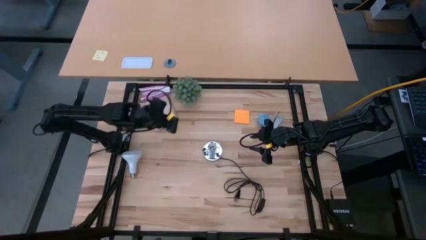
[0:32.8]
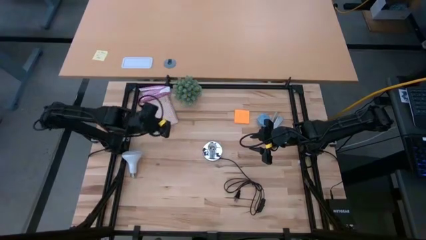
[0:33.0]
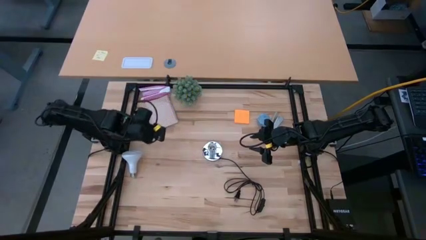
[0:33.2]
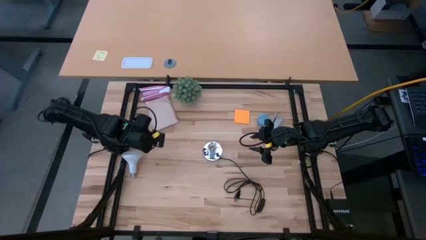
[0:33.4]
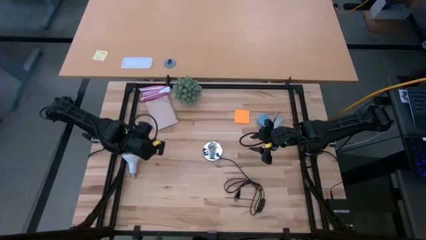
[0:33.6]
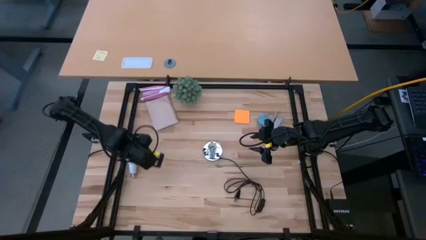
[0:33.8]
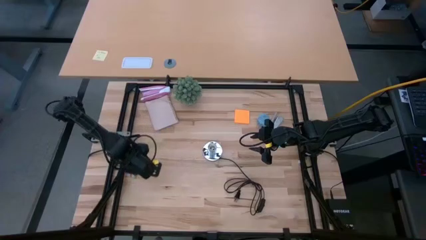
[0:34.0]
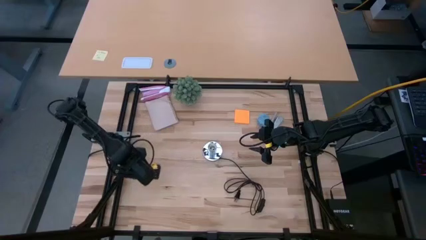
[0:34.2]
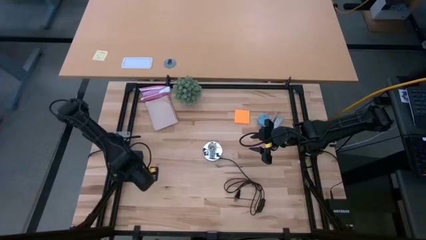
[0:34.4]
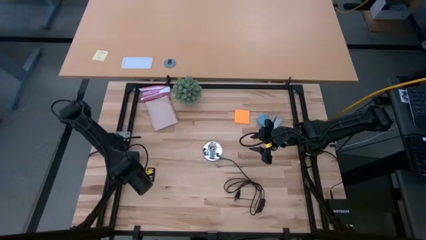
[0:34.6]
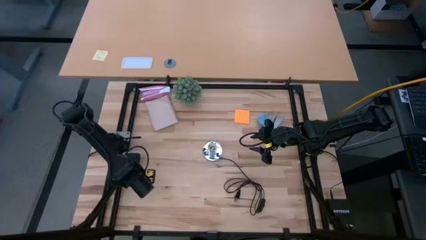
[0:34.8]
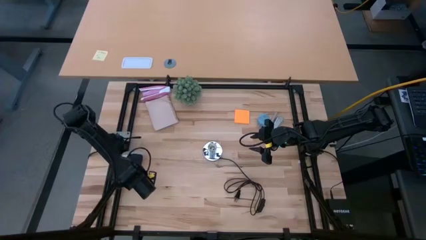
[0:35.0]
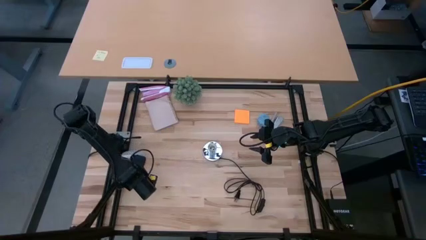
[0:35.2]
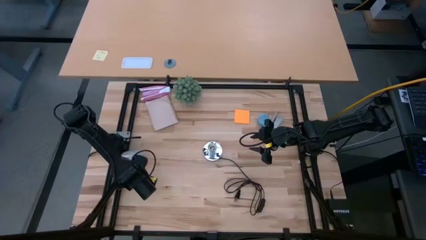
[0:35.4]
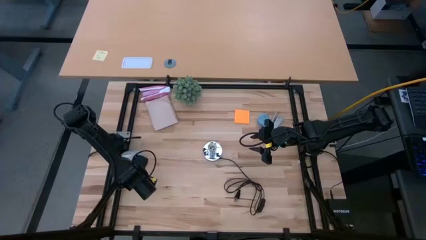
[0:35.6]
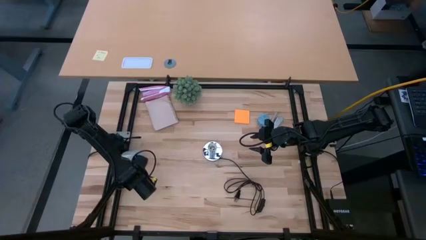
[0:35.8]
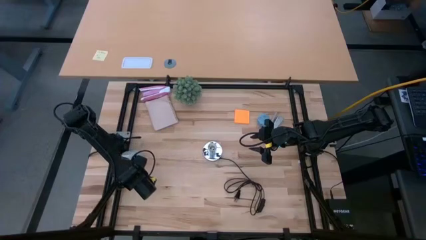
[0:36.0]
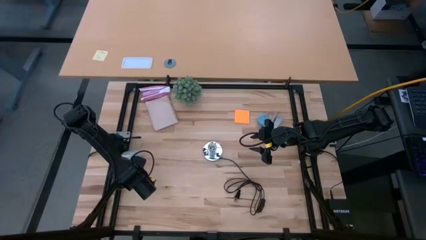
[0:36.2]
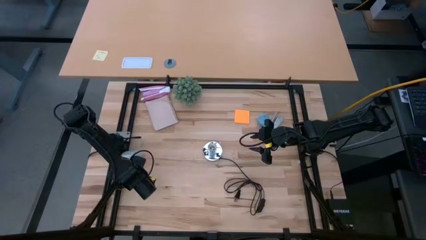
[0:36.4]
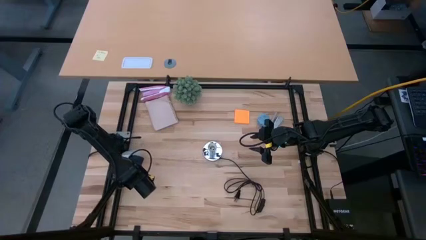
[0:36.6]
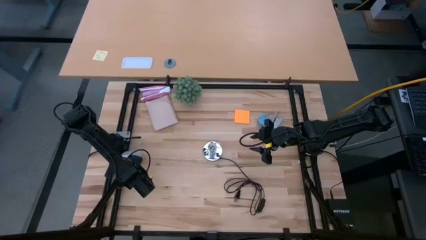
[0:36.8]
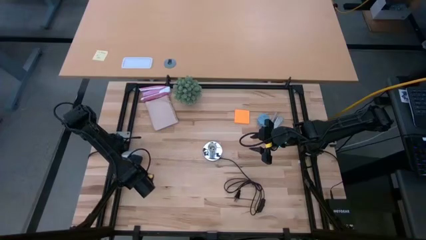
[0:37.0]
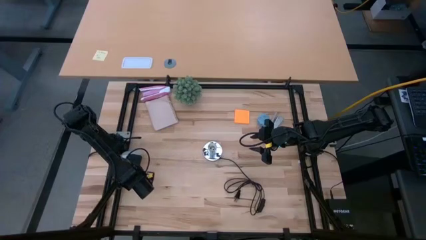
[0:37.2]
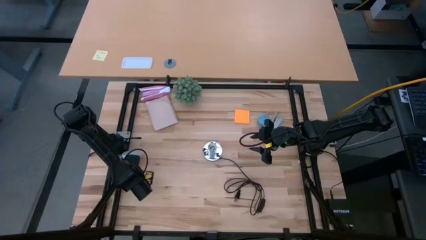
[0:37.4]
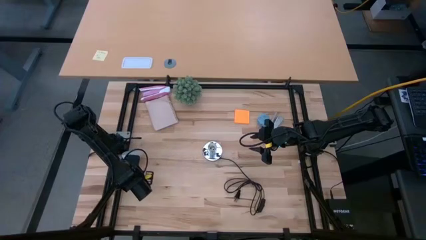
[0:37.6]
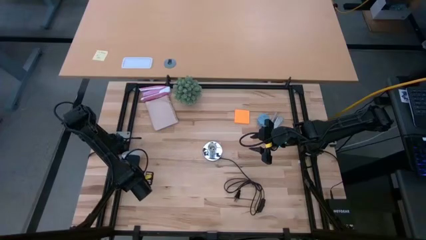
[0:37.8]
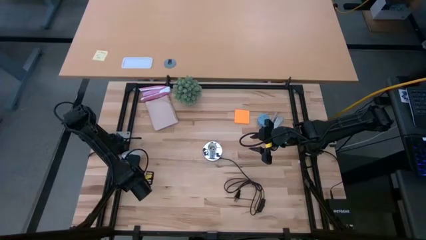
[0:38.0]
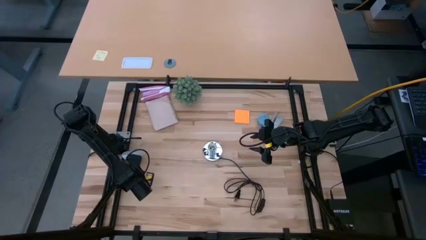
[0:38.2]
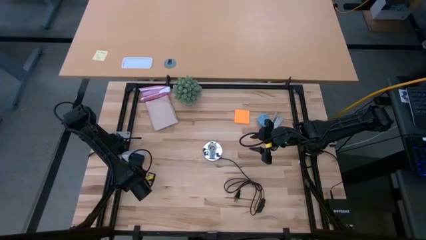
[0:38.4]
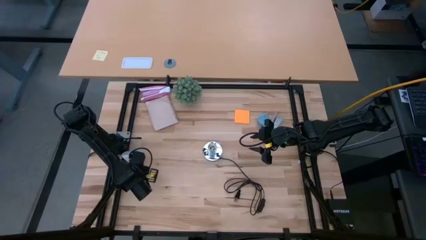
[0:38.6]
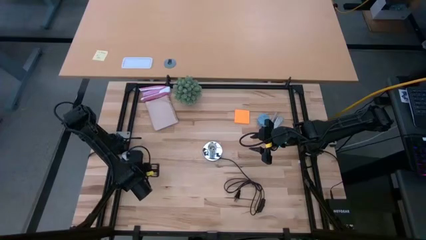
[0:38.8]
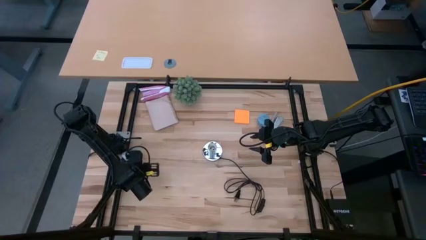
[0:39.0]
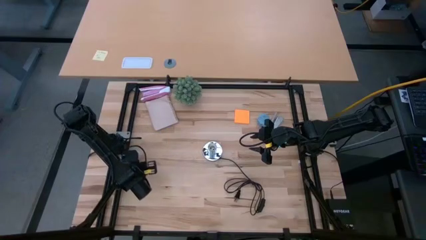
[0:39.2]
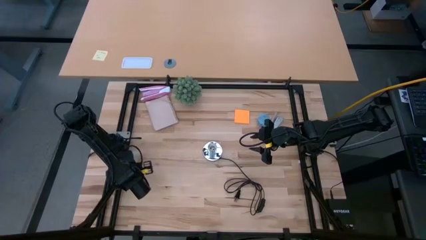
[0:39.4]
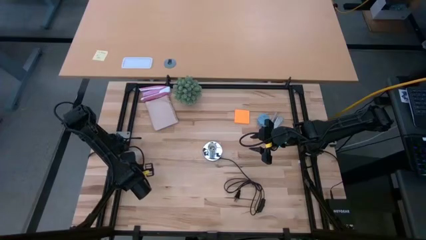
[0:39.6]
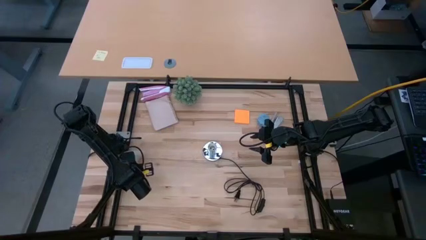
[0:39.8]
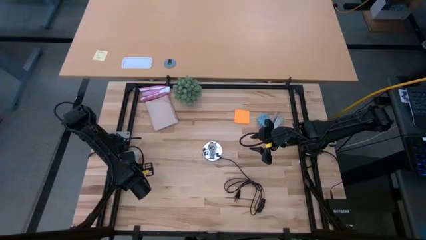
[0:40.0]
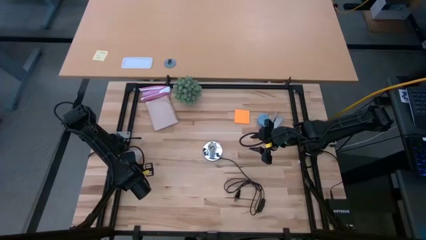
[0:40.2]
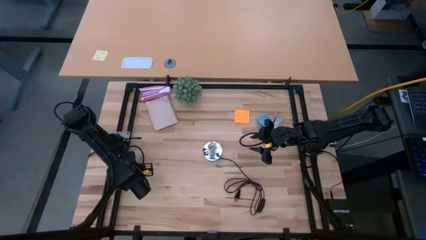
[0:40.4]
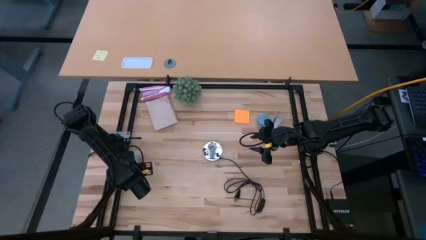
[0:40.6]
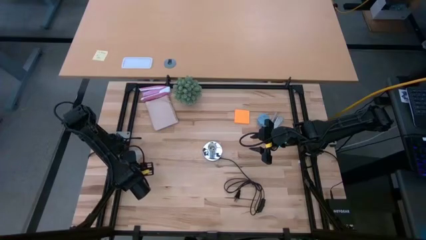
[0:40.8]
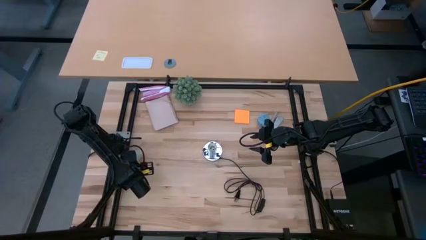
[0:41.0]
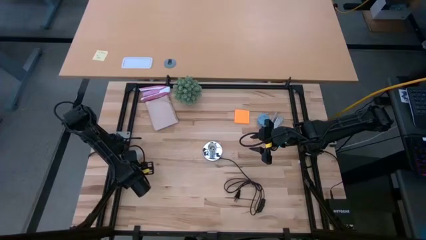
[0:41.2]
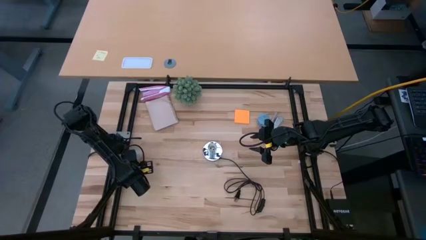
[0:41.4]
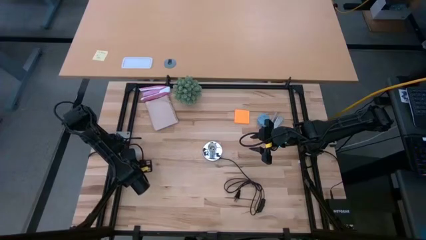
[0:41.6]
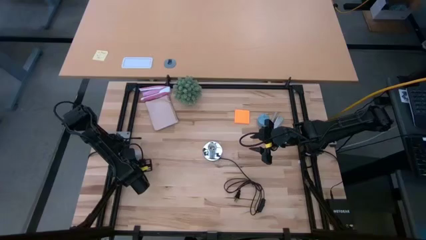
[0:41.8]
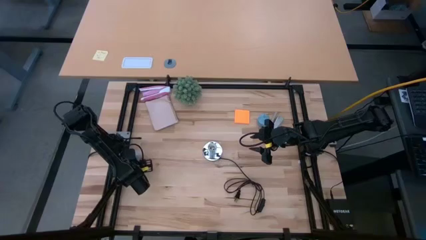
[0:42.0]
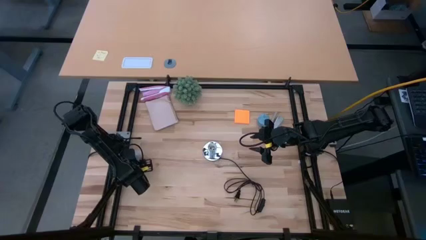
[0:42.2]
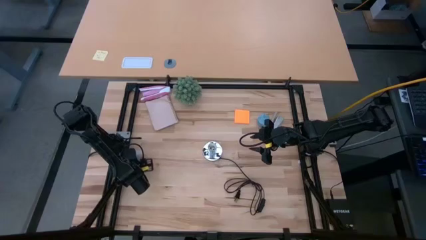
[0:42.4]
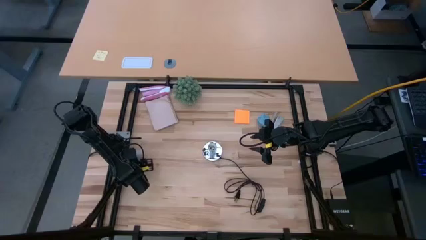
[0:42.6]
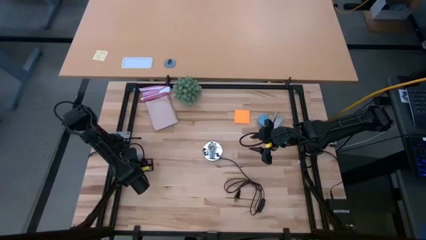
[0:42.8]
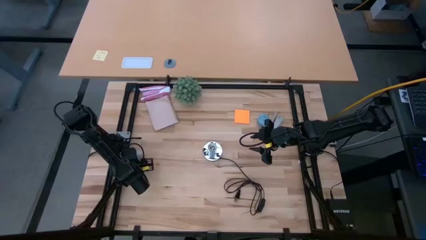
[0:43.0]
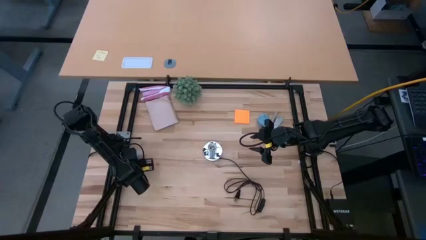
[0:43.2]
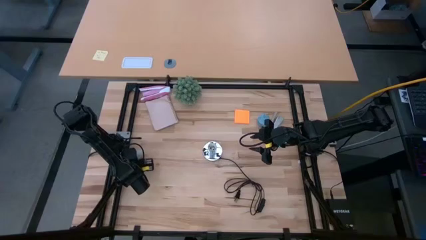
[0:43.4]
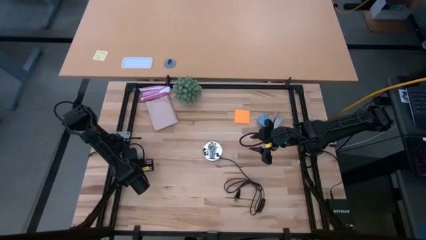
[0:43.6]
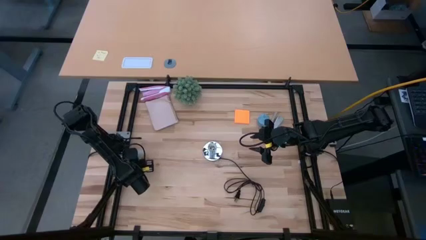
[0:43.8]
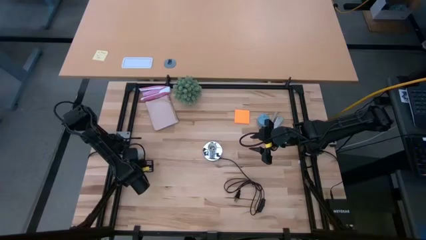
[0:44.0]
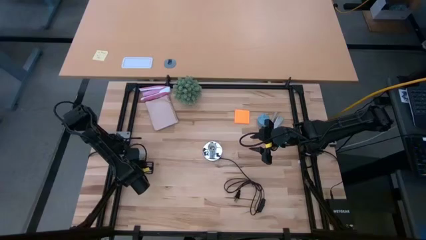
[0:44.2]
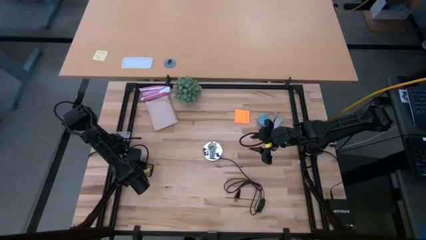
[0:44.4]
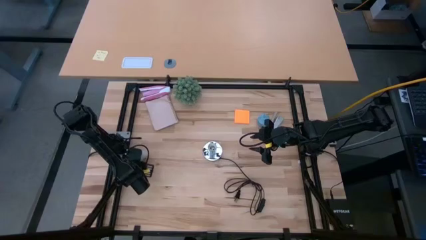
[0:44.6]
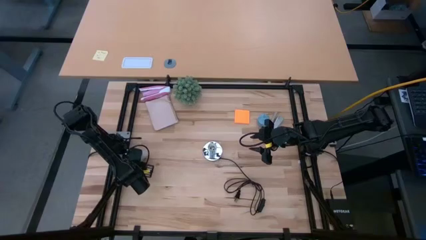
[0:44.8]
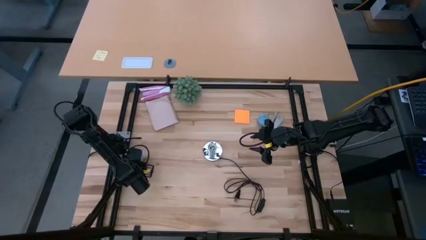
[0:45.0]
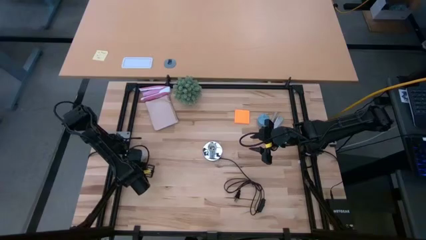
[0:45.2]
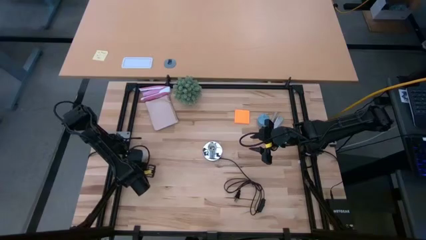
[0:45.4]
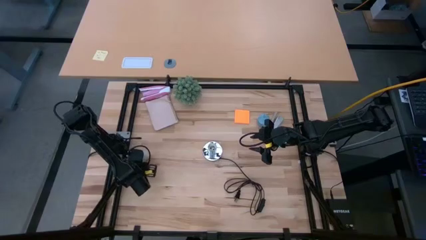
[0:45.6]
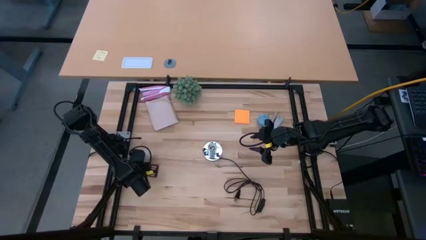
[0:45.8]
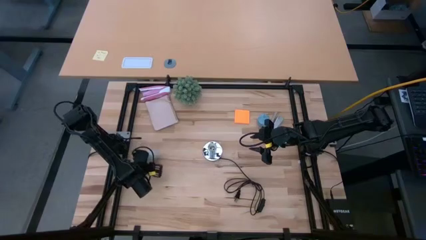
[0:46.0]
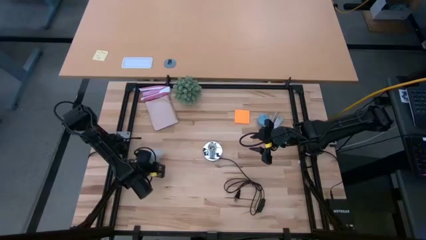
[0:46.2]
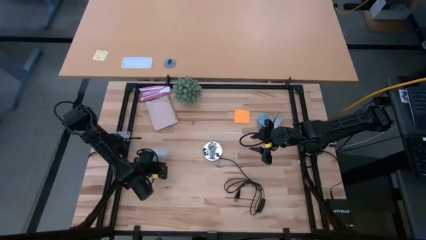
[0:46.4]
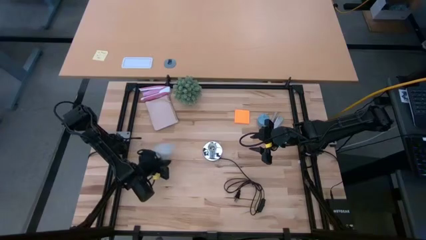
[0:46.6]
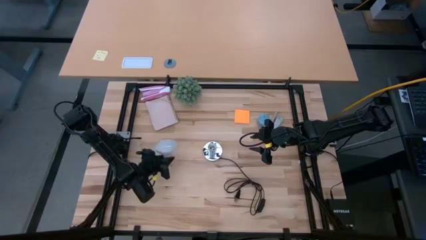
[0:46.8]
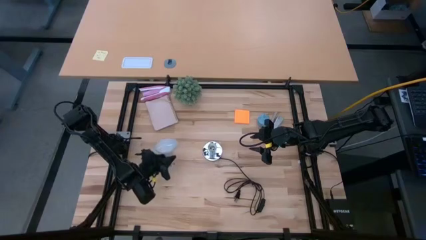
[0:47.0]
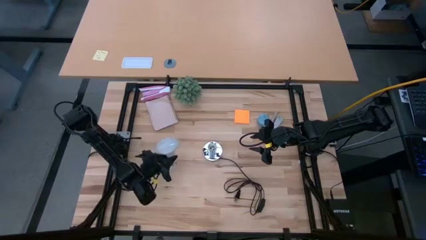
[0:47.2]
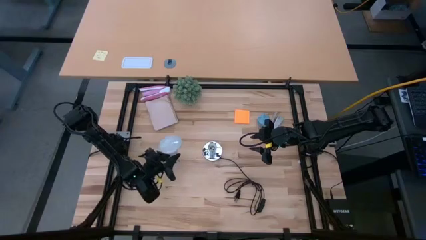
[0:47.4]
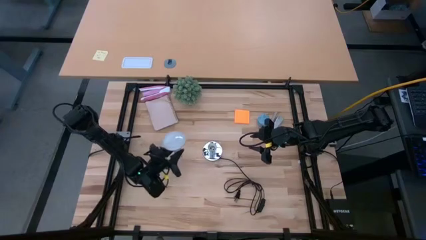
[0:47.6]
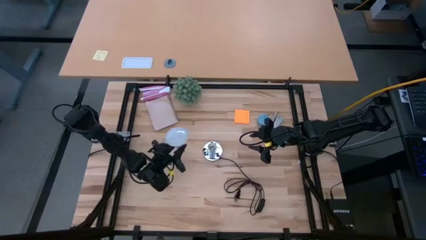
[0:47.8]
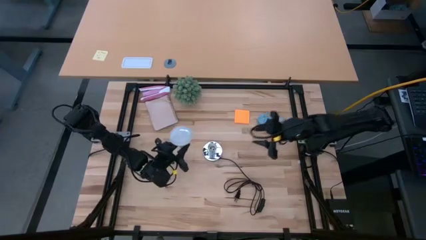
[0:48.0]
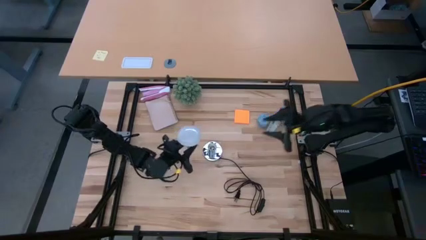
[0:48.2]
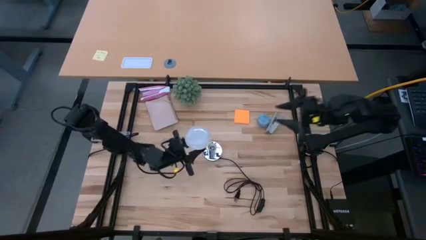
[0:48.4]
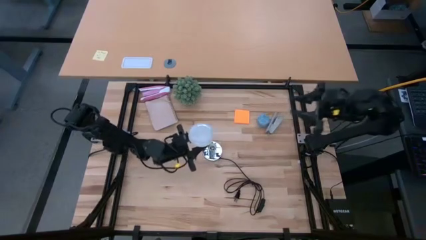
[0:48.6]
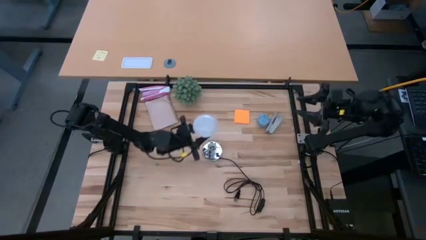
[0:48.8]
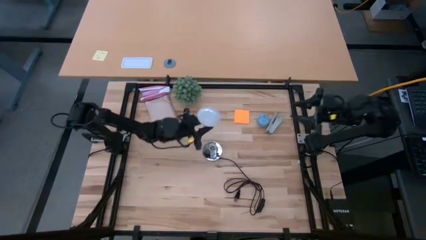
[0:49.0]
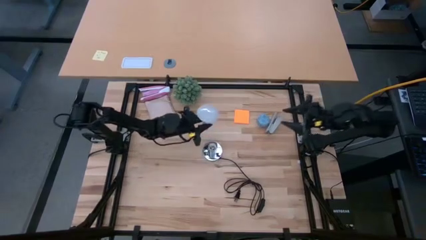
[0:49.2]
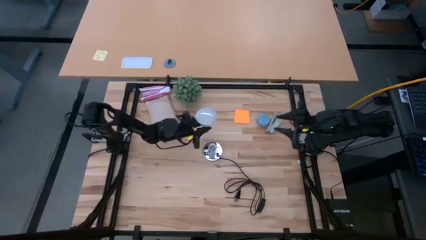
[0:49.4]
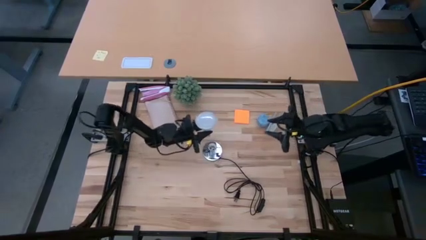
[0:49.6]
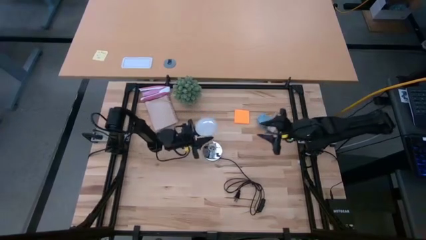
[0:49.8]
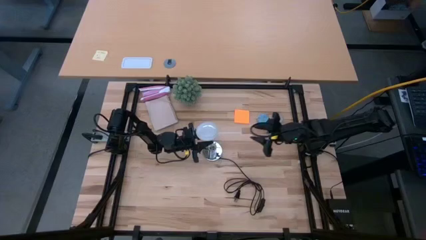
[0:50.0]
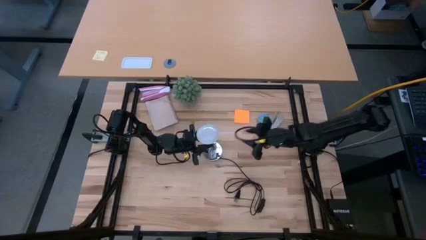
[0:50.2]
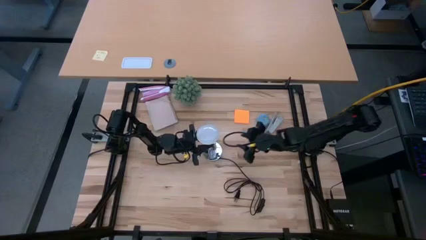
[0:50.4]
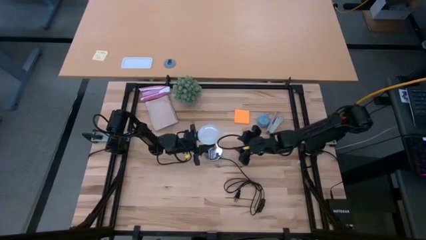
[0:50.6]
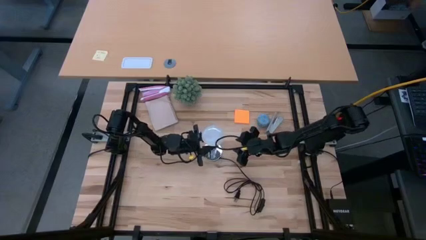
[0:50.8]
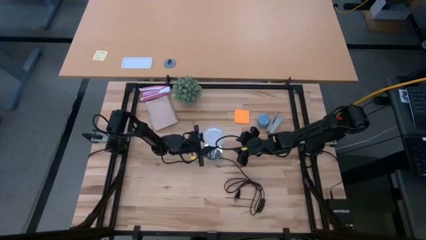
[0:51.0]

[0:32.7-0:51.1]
Task: Screw lightbulb
Insert the white lightbulb into the silver lamp
